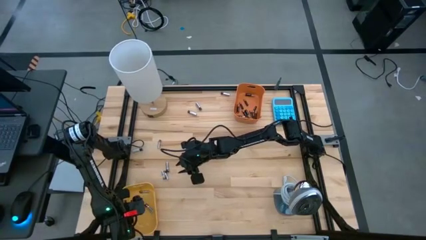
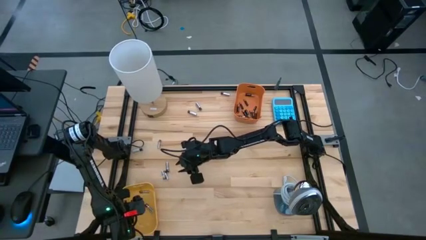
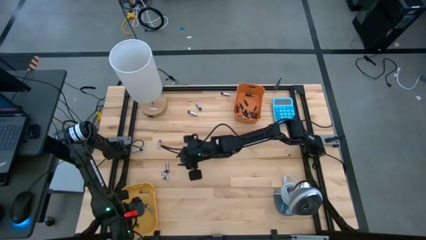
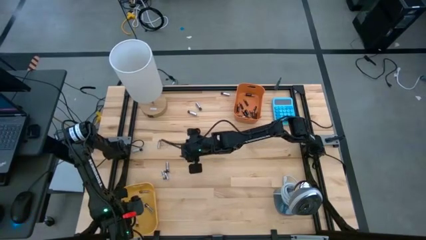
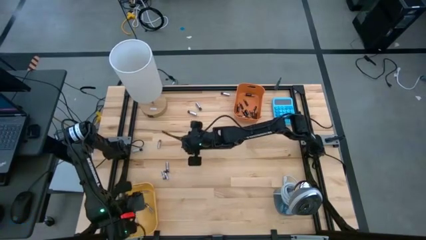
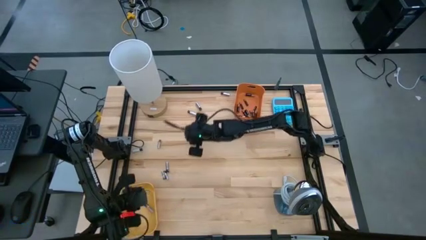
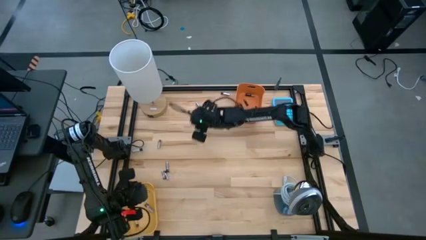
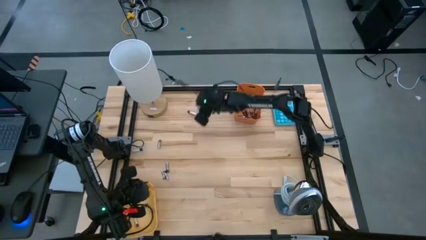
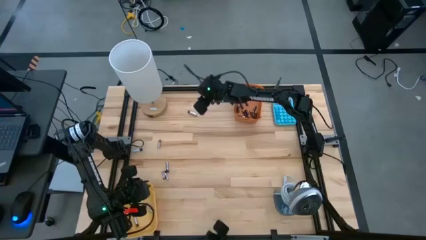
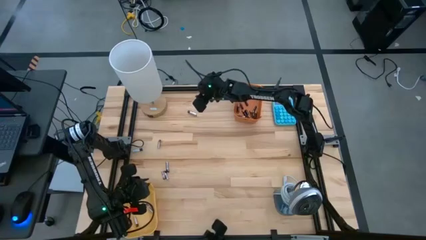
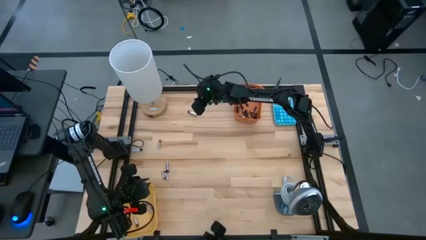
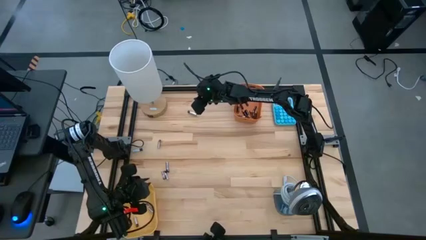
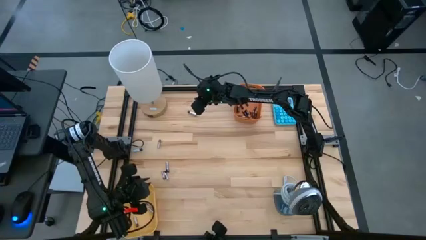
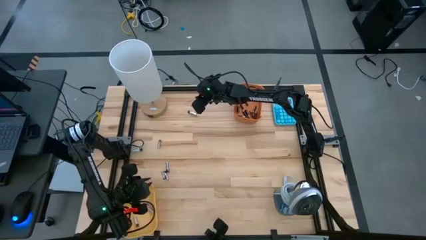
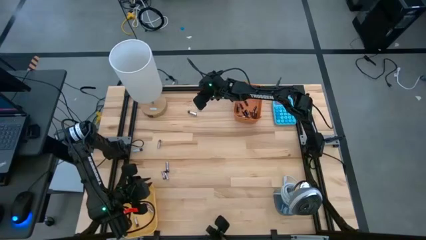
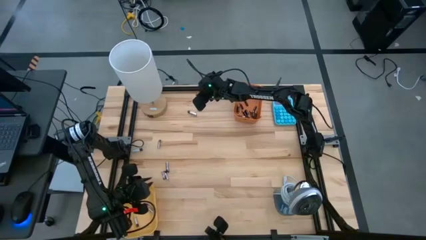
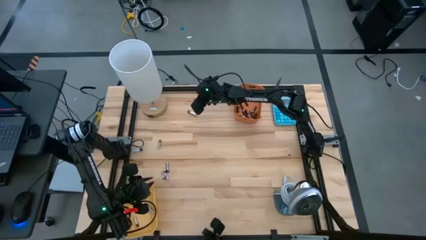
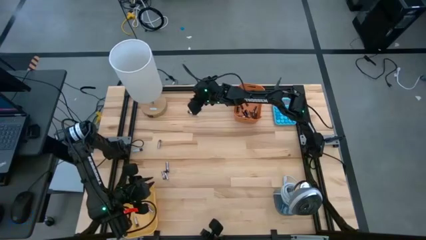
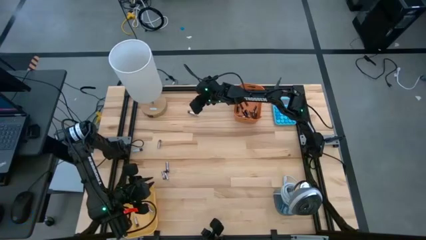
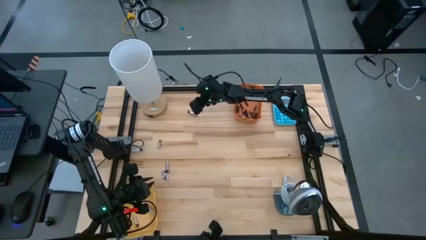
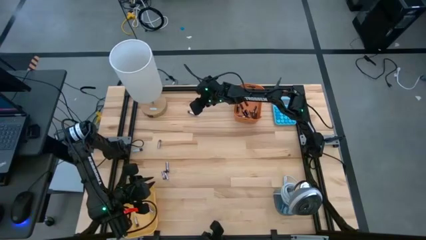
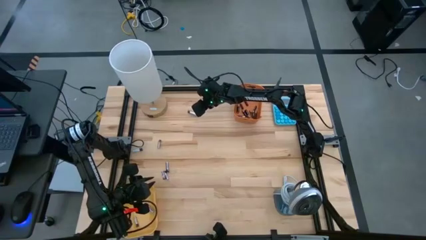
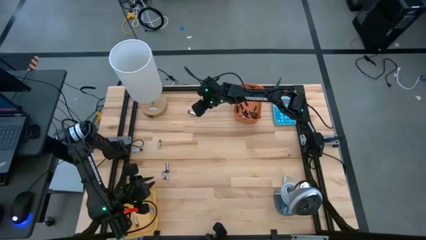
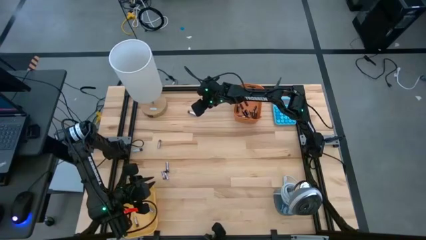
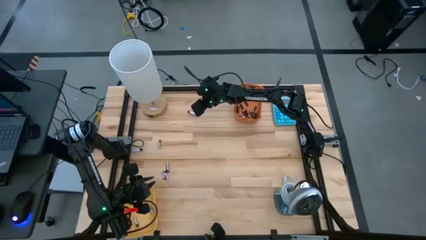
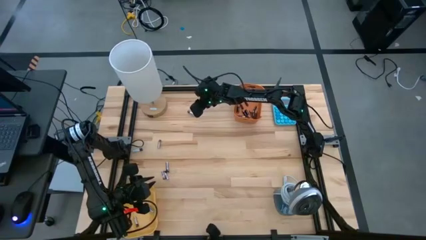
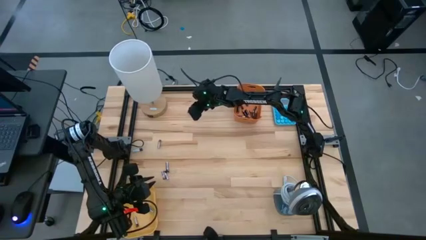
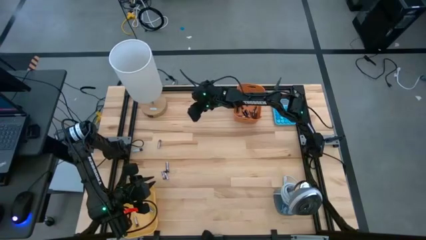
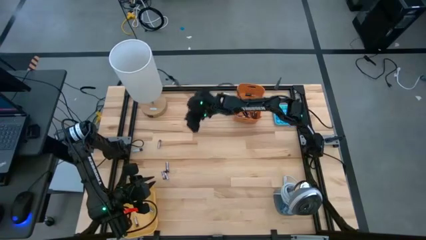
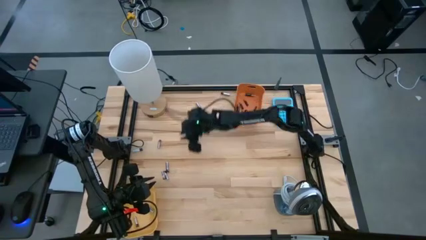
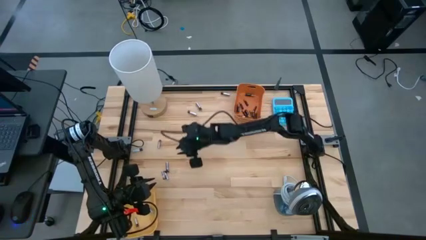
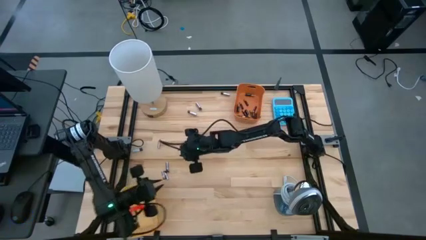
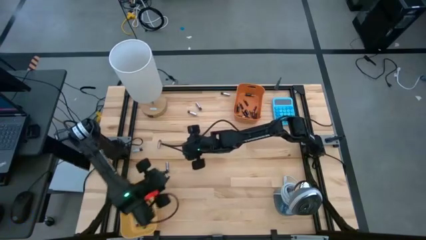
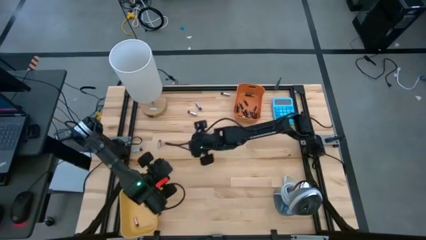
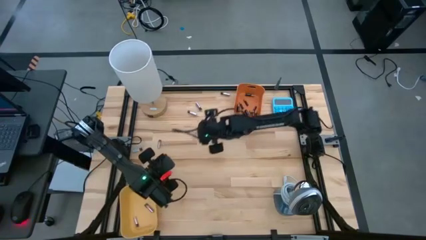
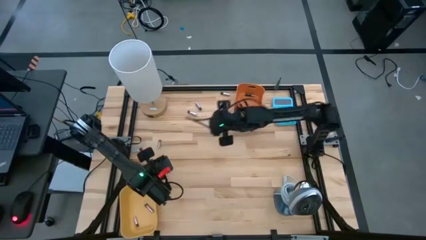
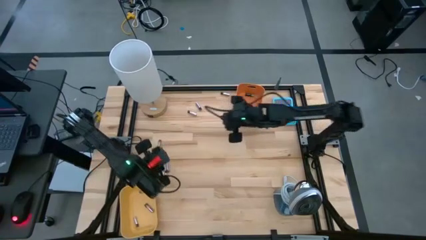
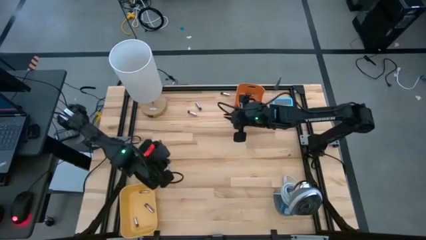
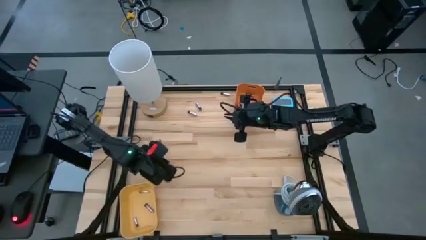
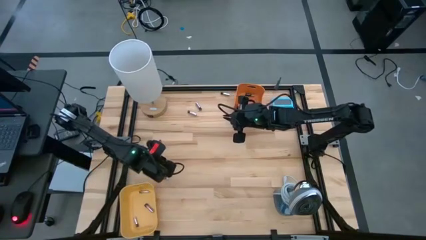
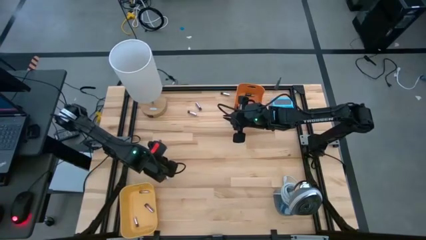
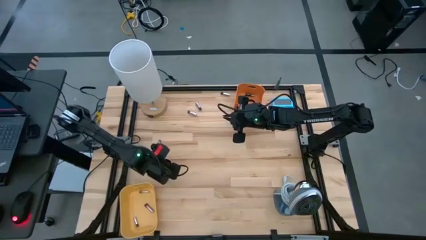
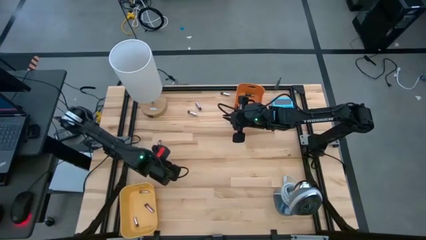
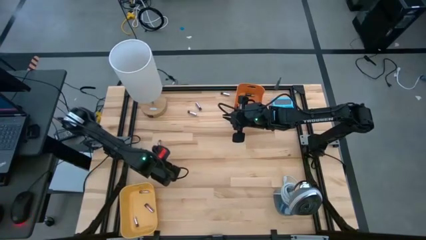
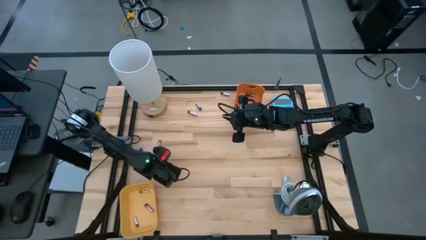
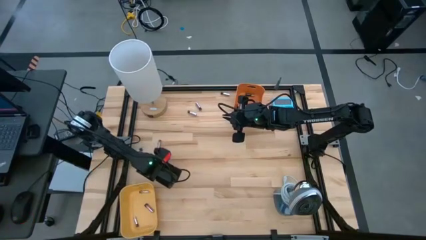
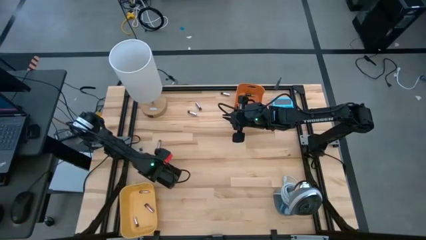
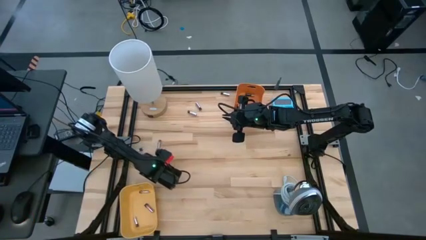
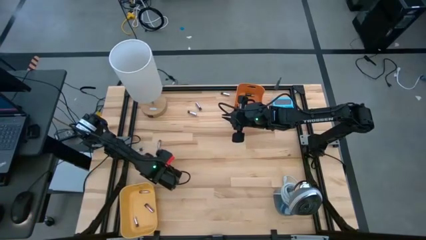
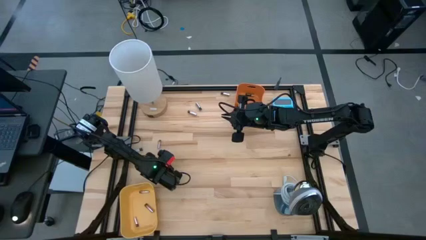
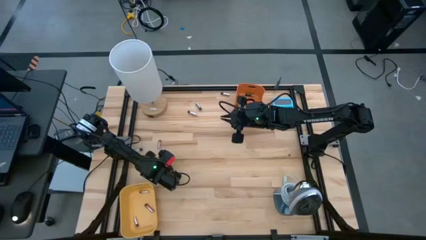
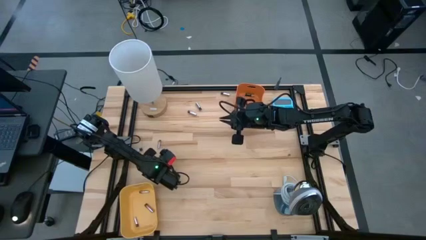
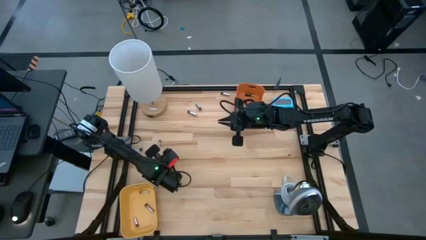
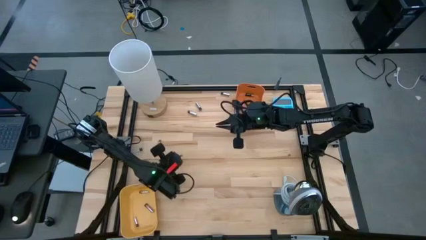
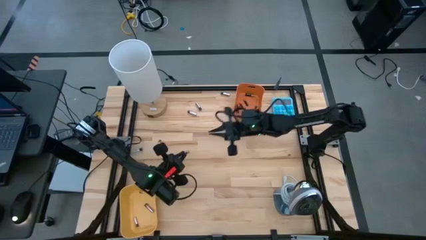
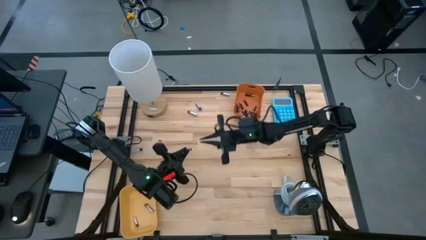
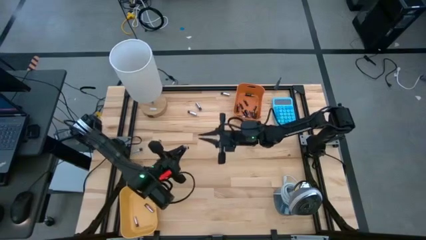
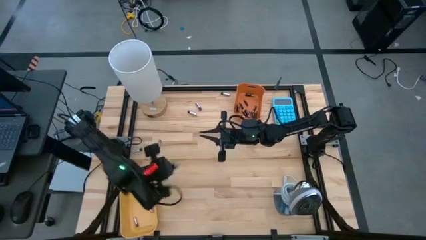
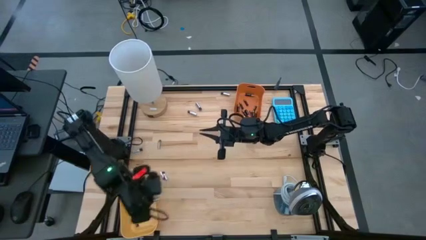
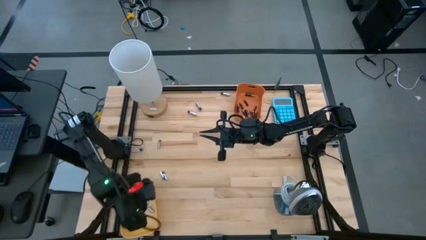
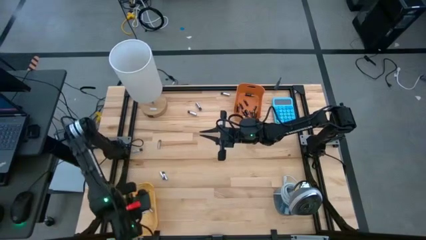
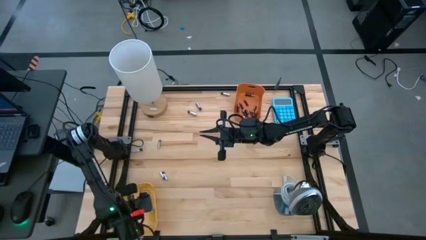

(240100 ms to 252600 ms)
Task: Sort batteries
Put the silver battery into the yellow bin

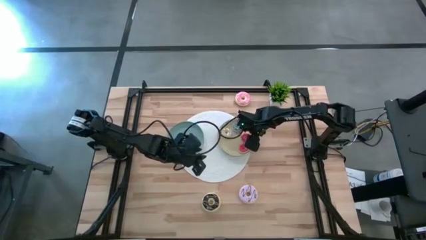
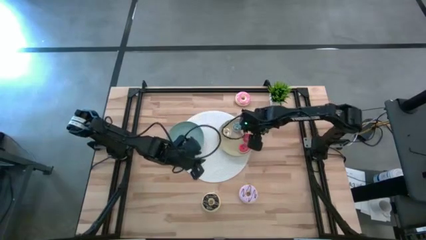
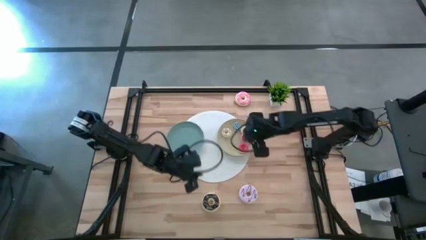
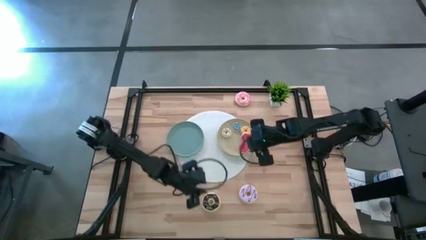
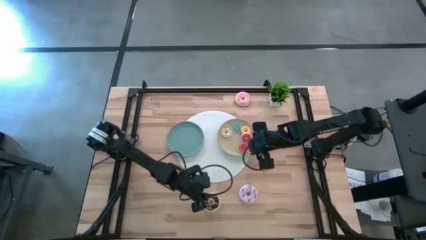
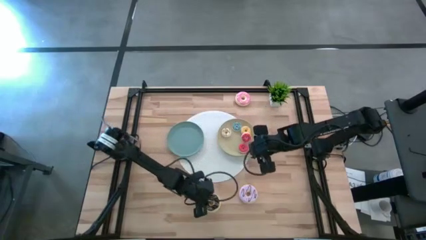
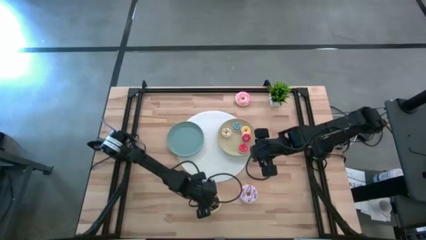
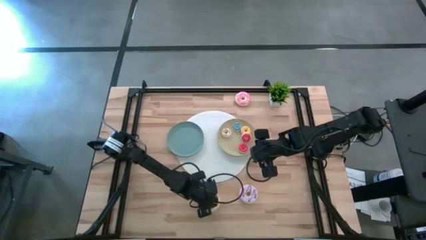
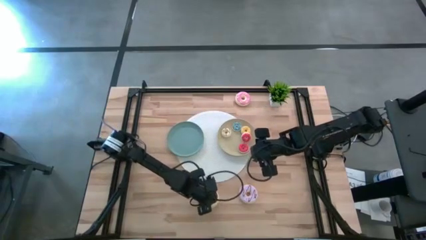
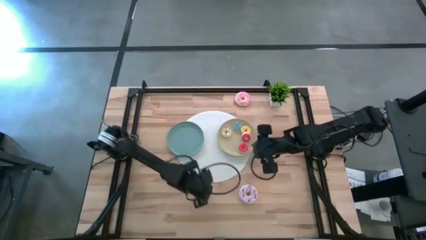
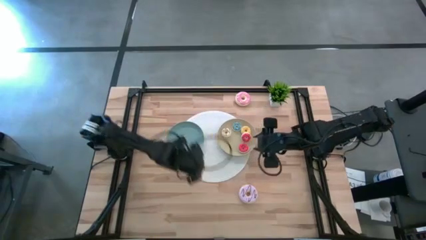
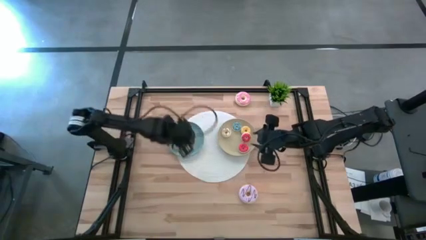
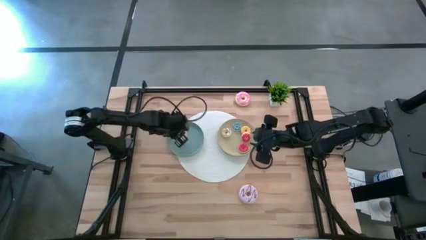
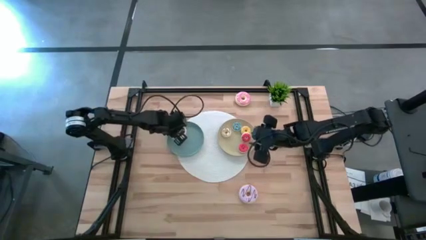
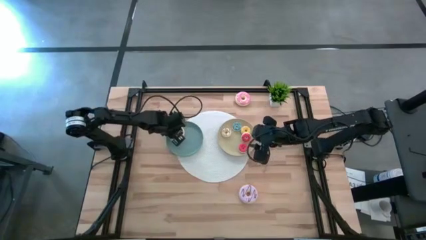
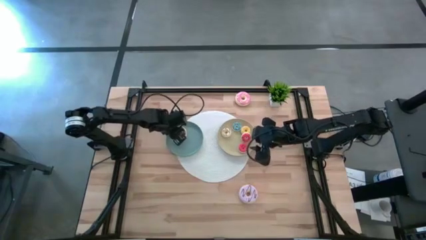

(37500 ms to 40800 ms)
Task: Pick & Place donuts
Put the big black donut on the blue plate
